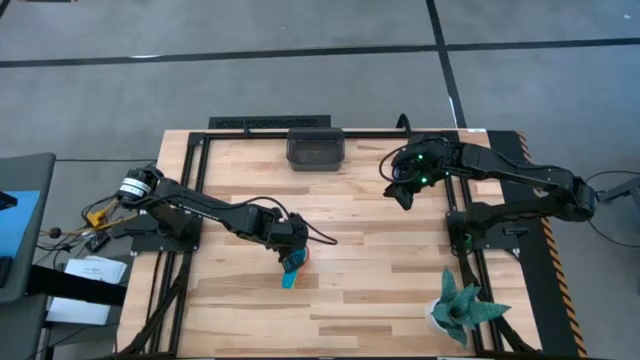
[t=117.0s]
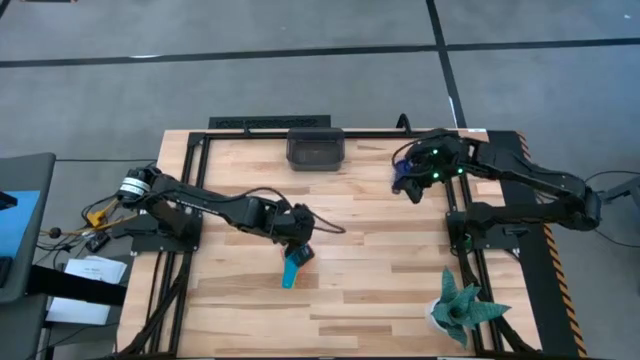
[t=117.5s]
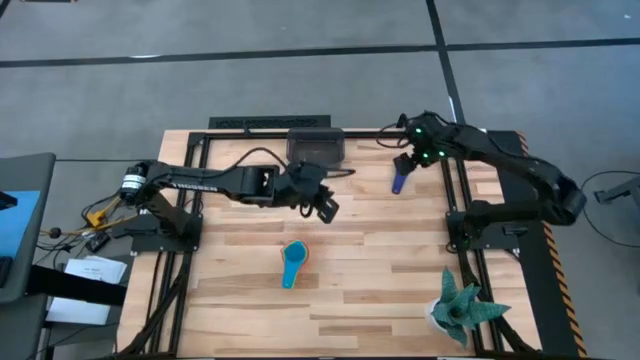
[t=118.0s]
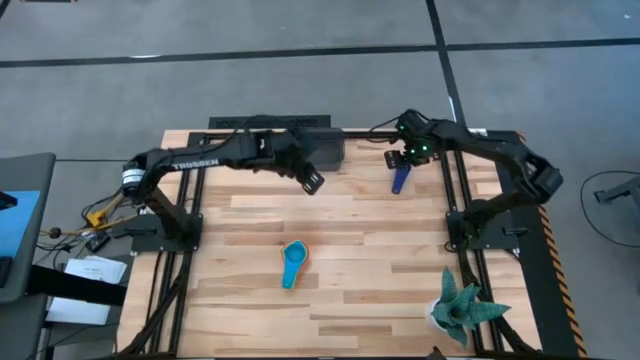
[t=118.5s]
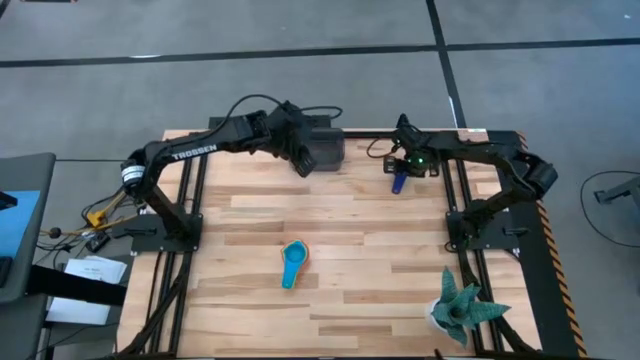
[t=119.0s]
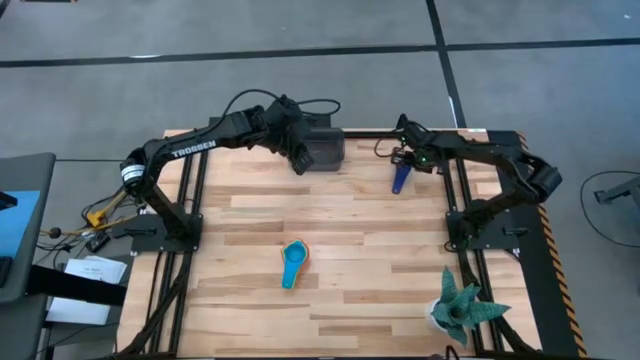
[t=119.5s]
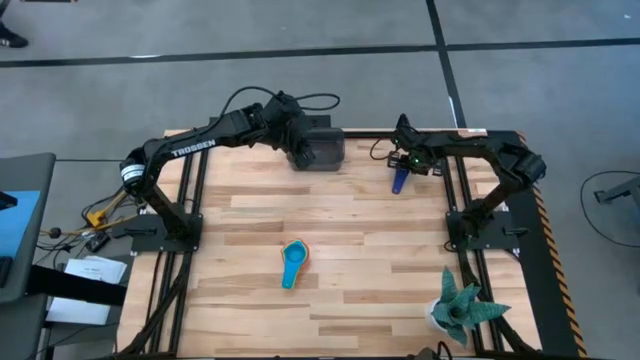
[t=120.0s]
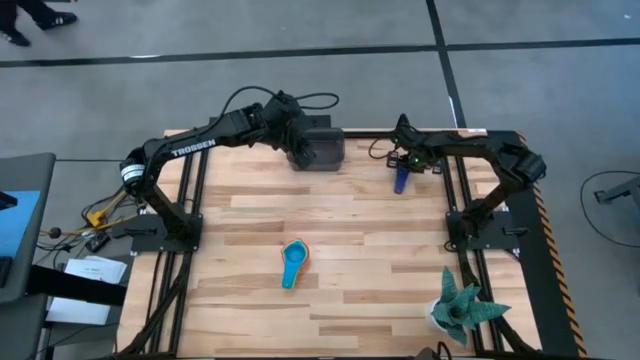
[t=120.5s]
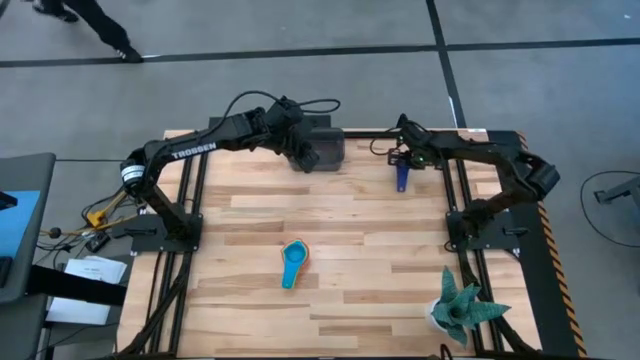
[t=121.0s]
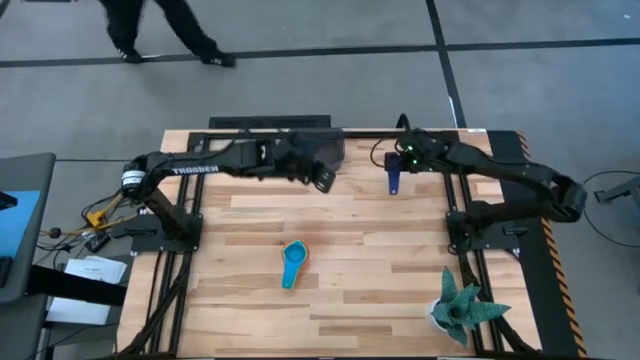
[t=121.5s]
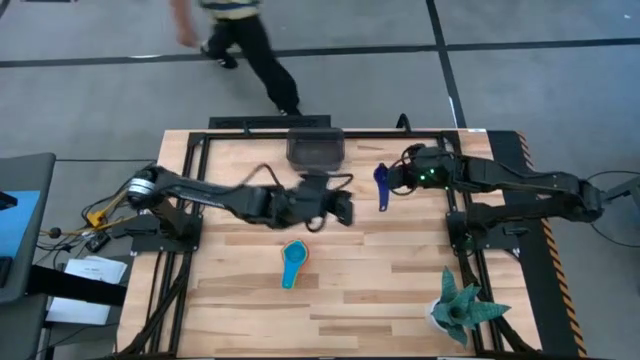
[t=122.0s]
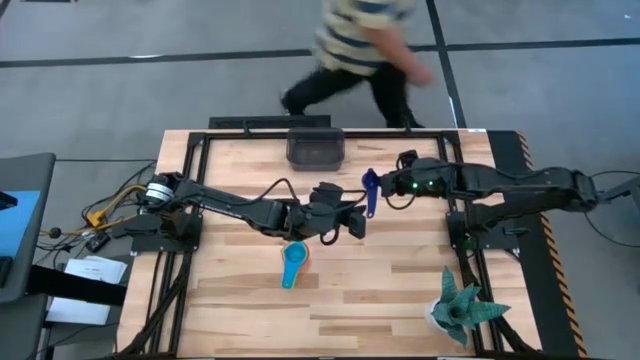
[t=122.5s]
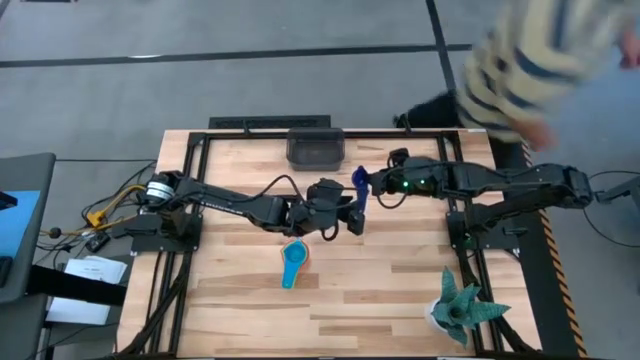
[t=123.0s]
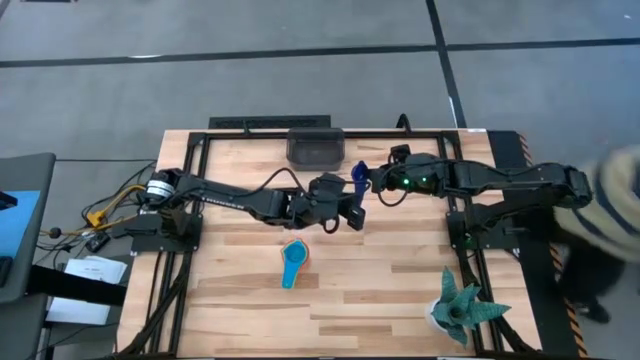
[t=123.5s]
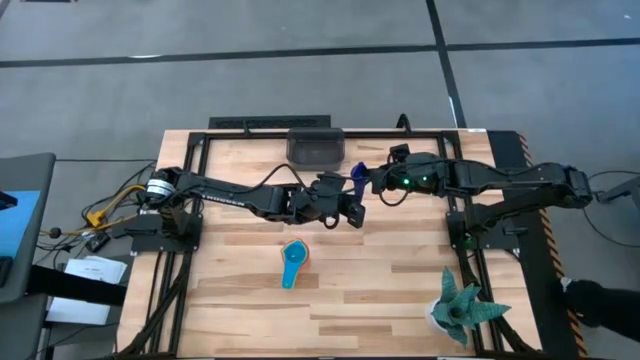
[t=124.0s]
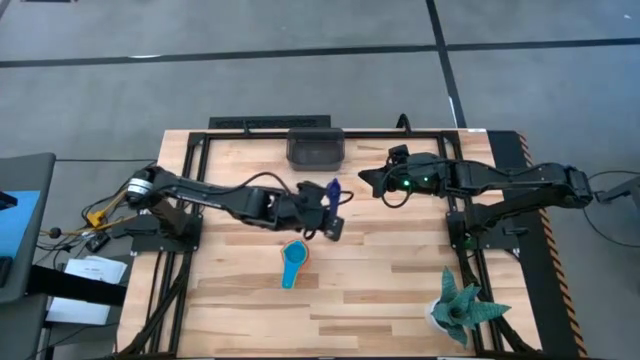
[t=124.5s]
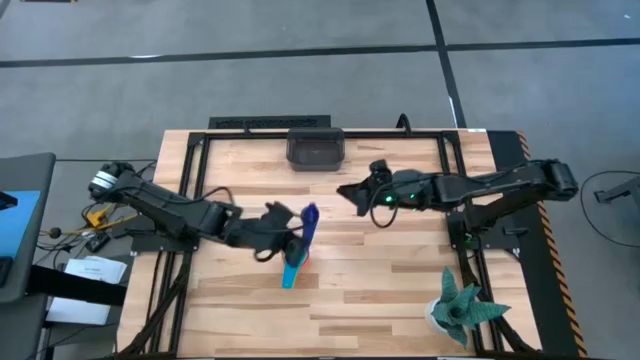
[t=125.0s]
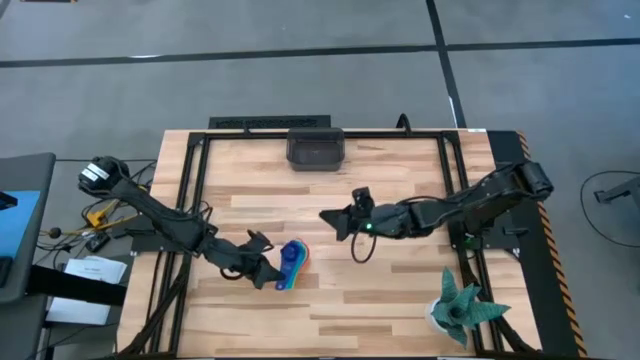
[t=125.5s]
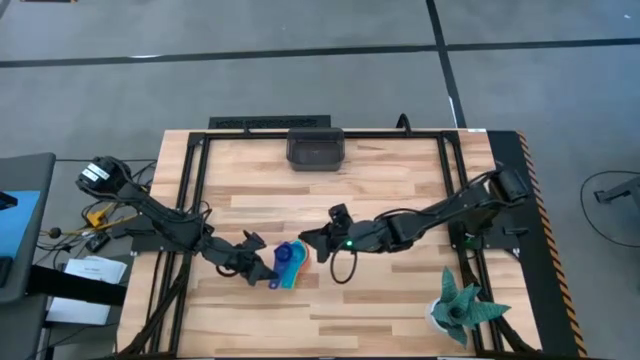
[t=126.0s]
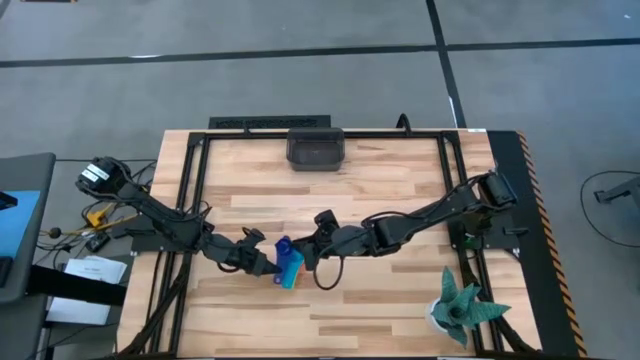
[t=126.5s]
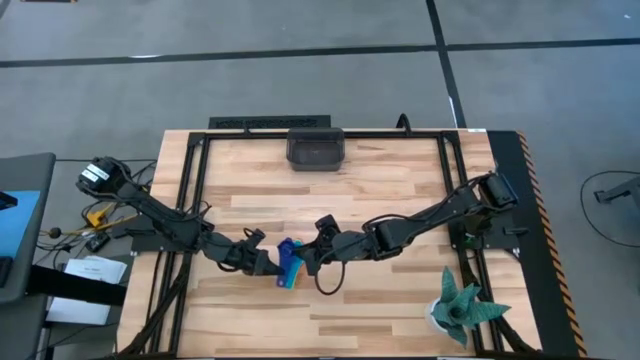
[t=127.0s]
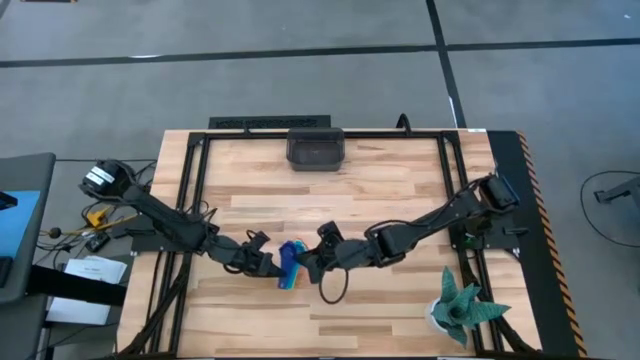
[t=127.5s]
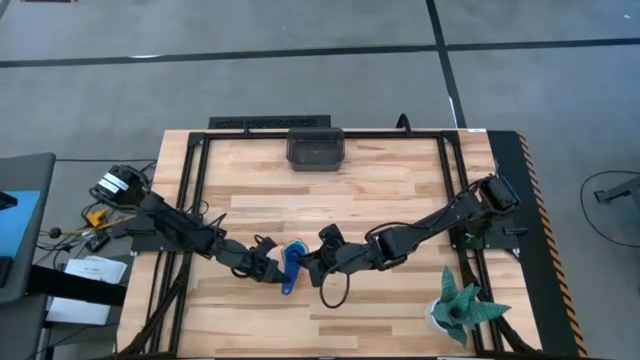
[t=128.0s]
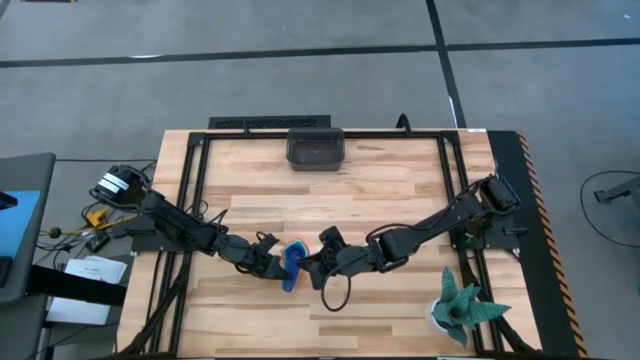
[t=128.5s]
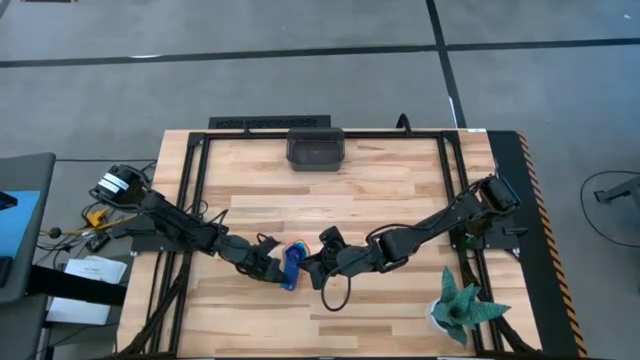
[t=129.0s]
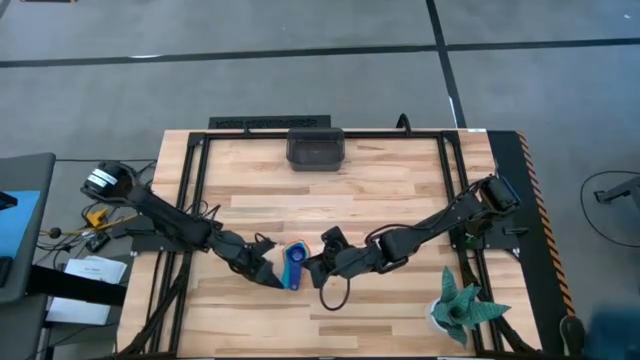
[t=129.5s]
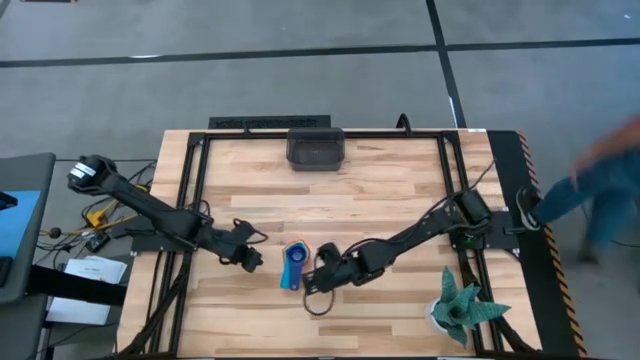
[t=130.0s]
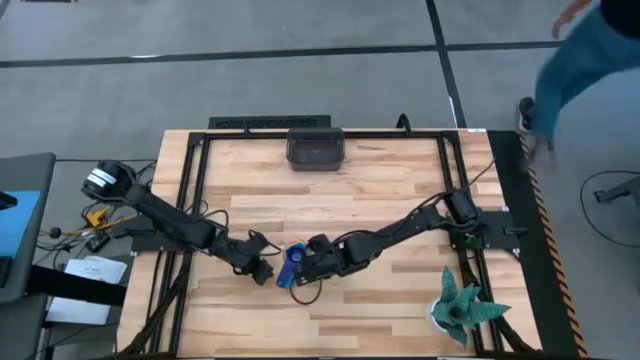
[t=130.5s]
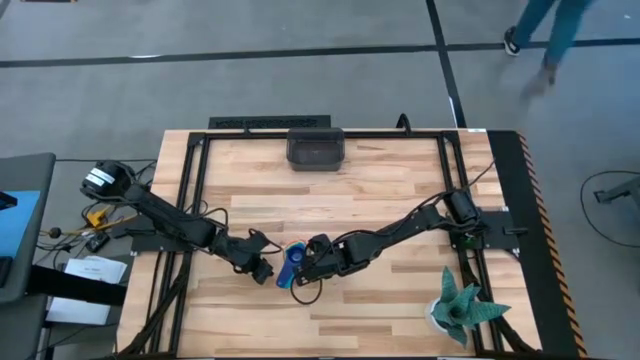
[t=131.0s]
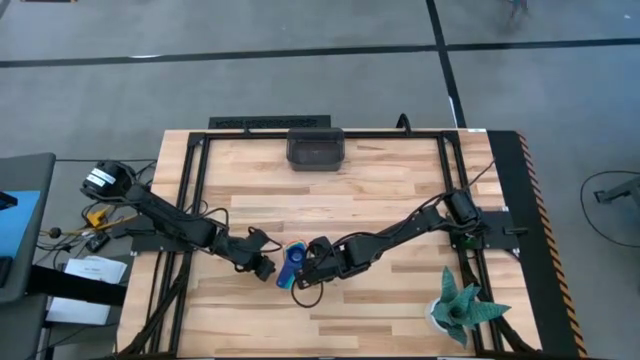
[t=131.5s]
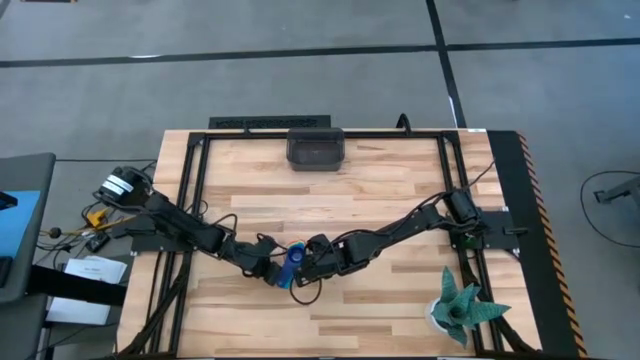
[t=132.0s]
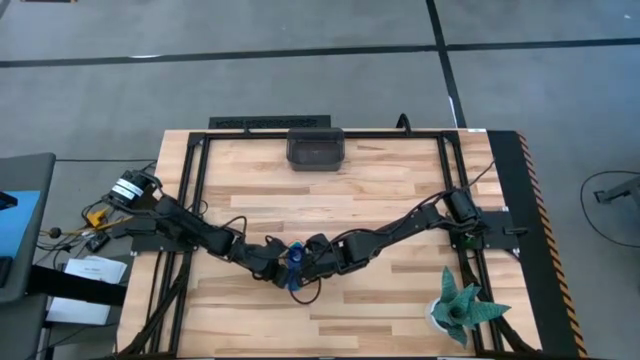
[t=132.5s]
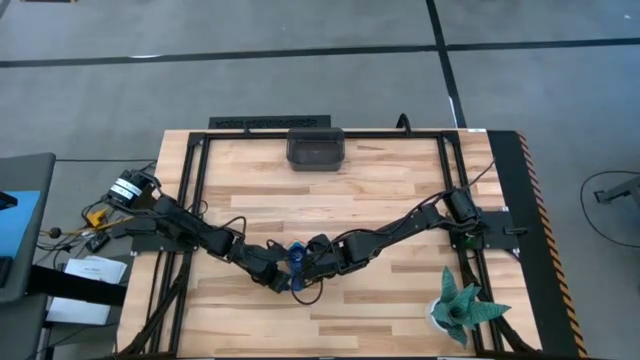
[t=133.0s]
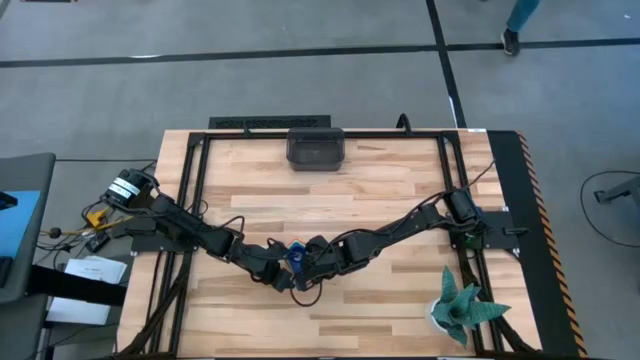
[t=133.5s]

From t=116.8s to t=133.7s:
Task: Nest measuring cups in basket
Stack the dark blue measuring cup on top of the light blue measuring cup
